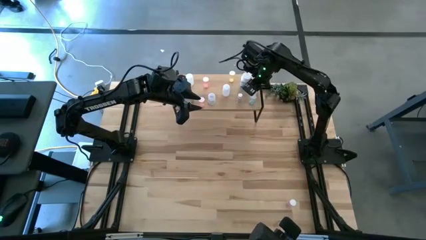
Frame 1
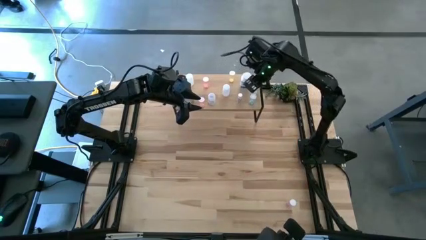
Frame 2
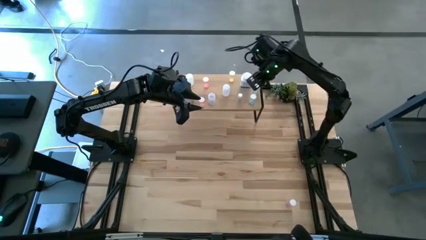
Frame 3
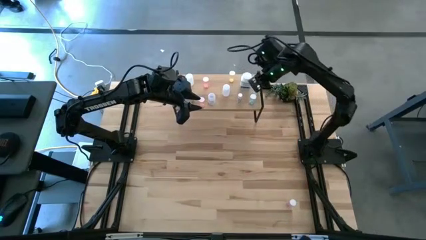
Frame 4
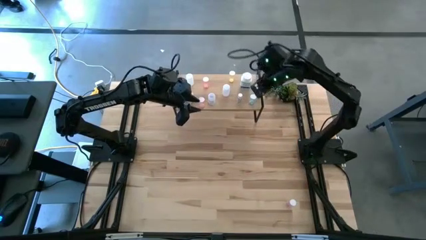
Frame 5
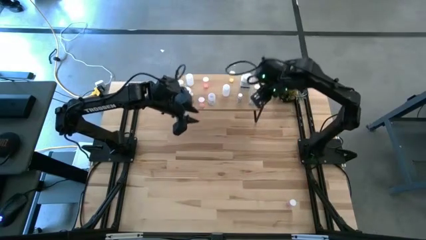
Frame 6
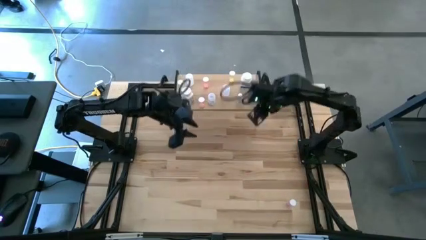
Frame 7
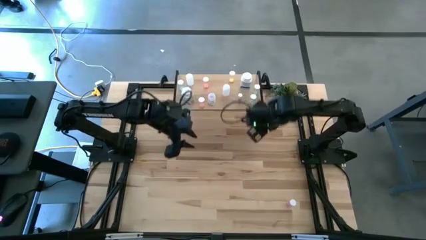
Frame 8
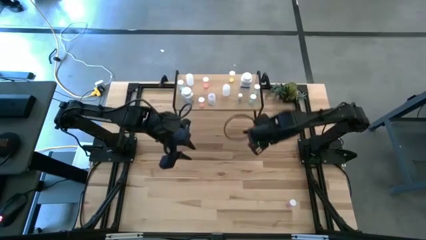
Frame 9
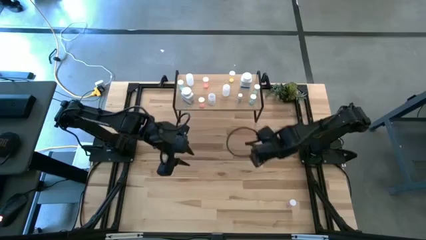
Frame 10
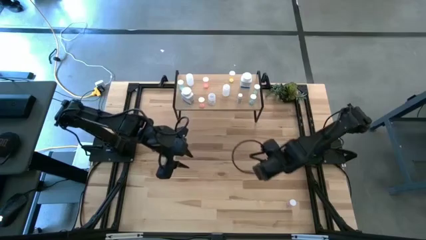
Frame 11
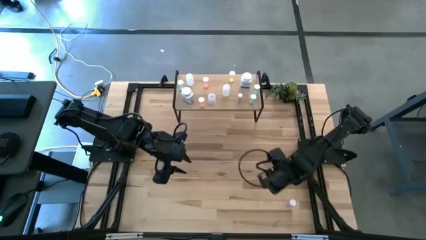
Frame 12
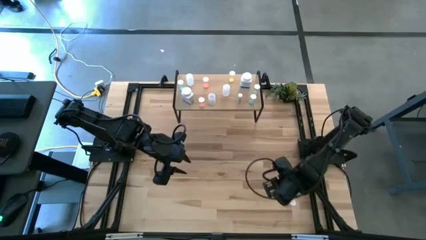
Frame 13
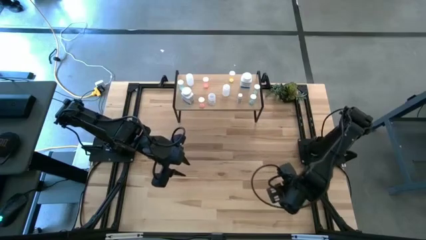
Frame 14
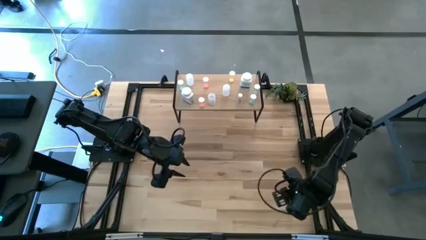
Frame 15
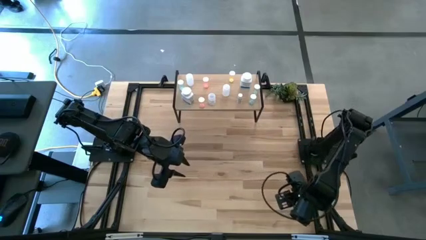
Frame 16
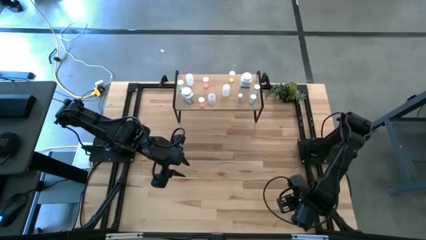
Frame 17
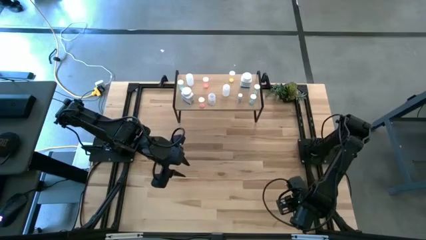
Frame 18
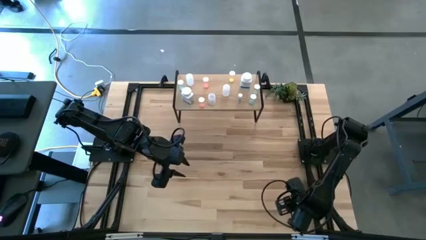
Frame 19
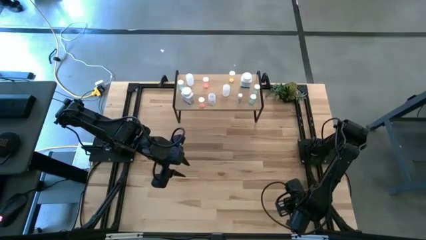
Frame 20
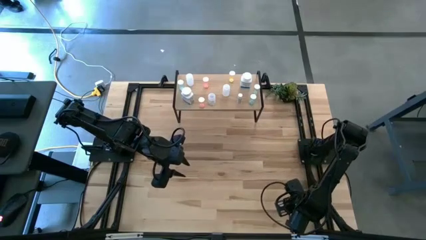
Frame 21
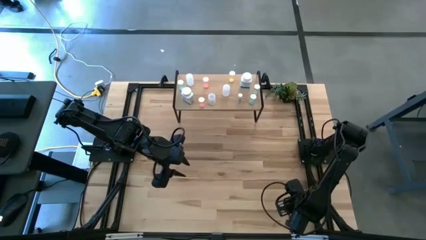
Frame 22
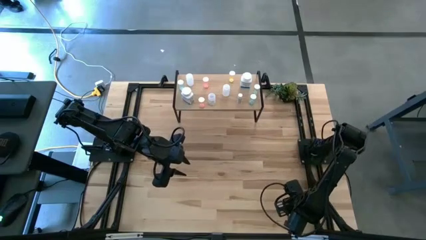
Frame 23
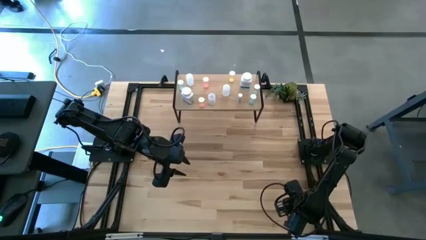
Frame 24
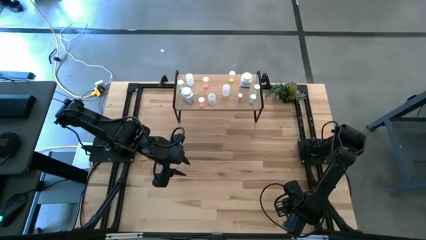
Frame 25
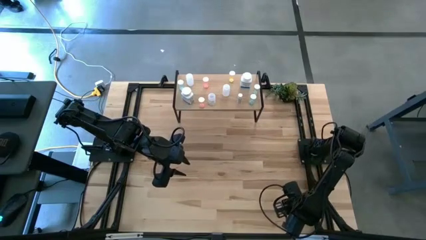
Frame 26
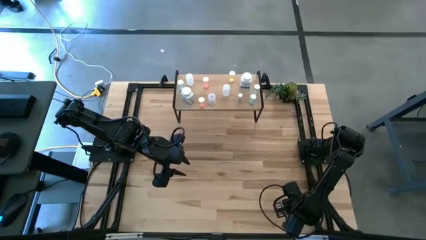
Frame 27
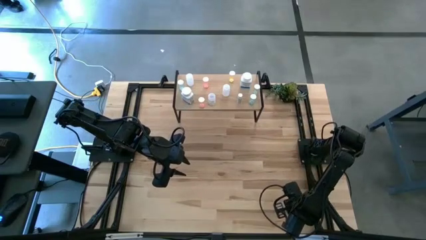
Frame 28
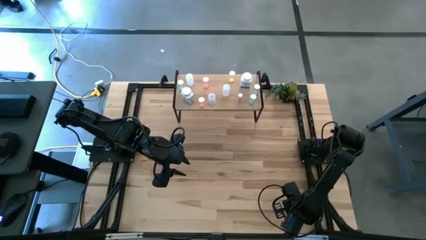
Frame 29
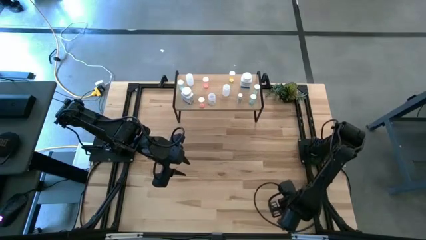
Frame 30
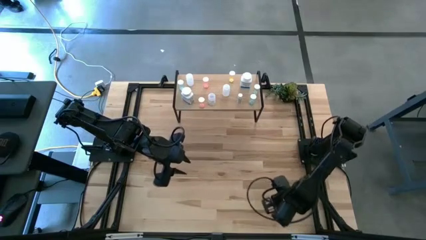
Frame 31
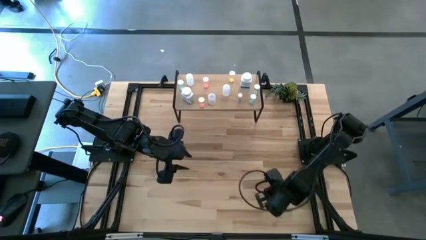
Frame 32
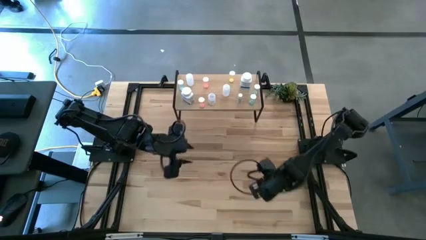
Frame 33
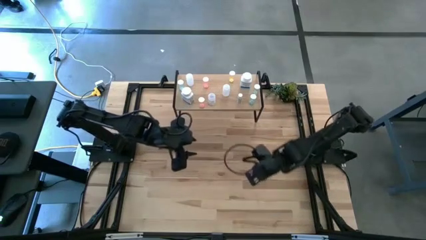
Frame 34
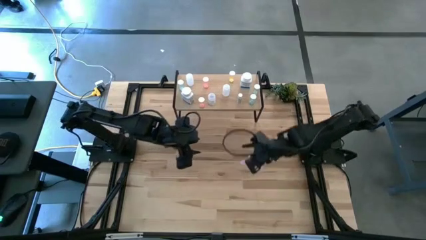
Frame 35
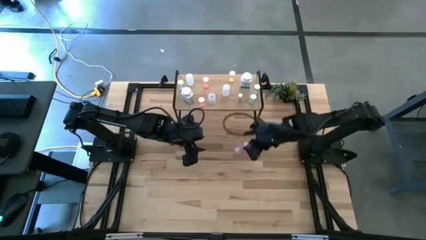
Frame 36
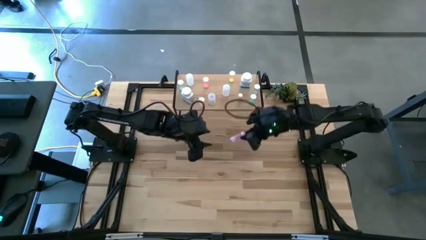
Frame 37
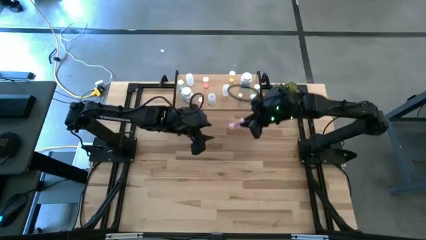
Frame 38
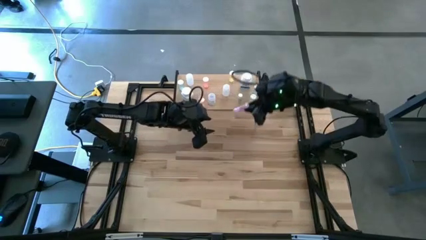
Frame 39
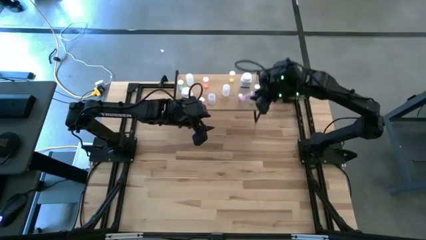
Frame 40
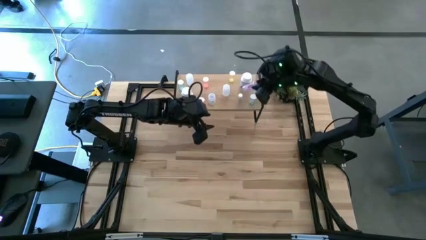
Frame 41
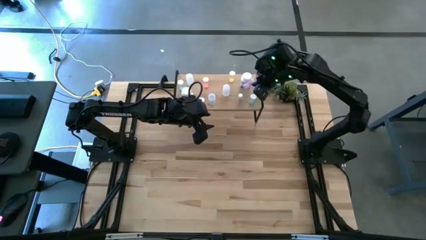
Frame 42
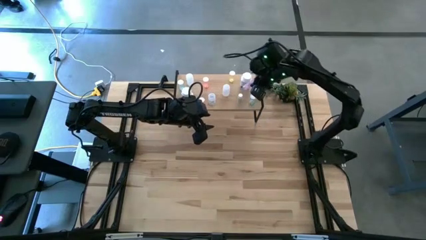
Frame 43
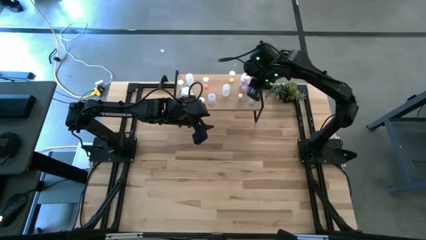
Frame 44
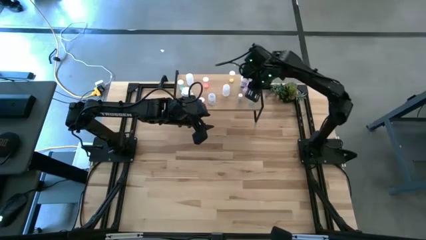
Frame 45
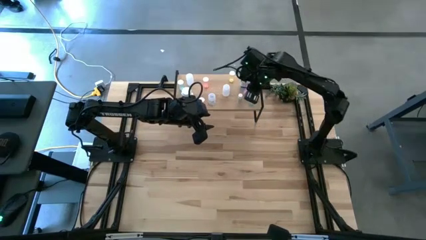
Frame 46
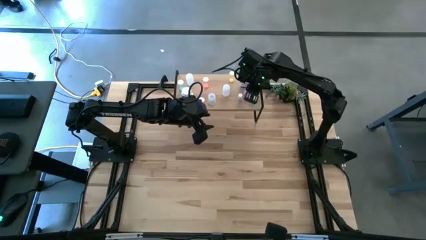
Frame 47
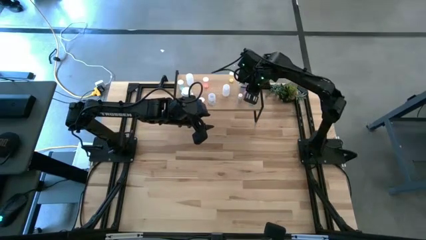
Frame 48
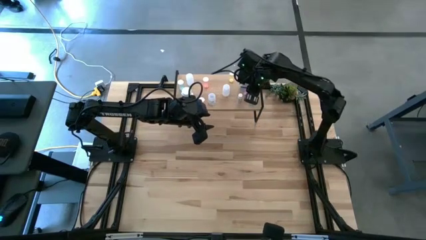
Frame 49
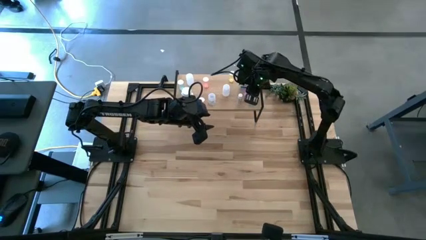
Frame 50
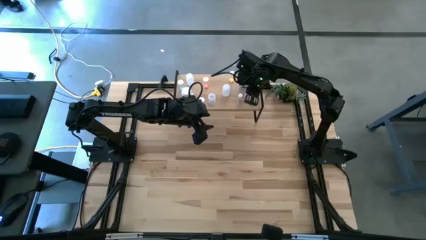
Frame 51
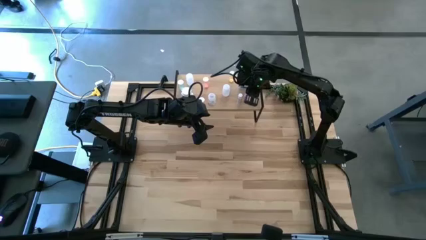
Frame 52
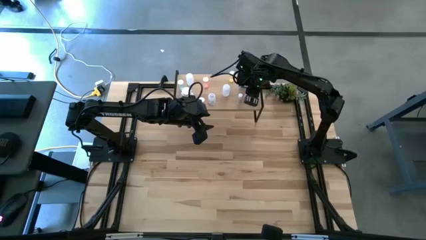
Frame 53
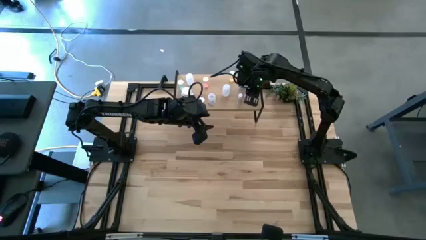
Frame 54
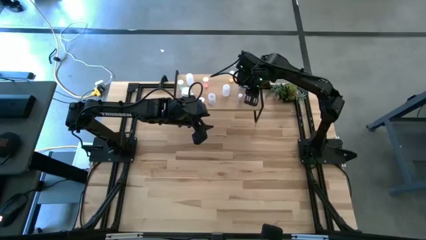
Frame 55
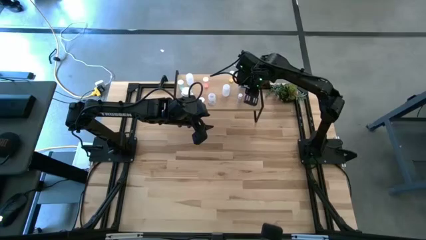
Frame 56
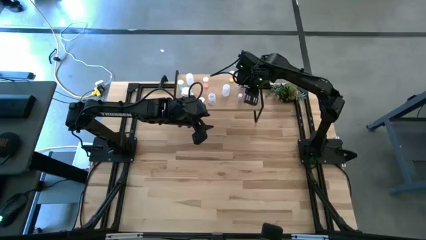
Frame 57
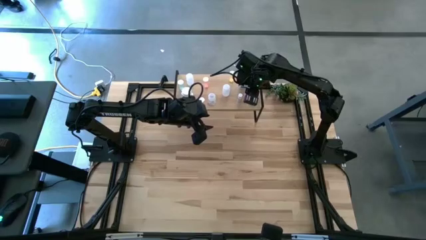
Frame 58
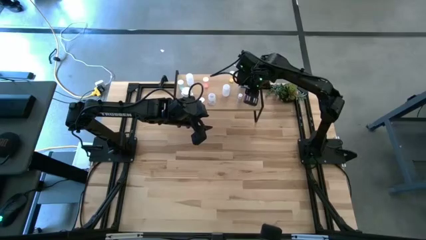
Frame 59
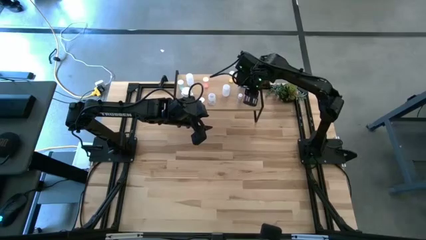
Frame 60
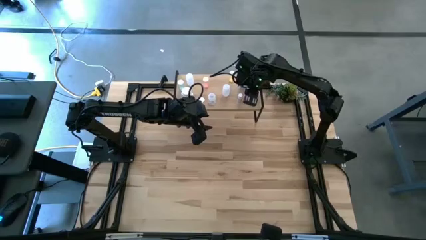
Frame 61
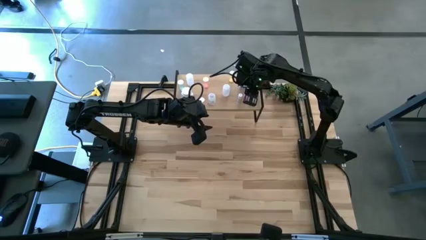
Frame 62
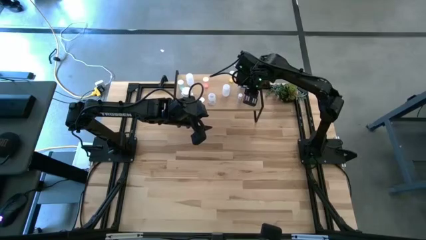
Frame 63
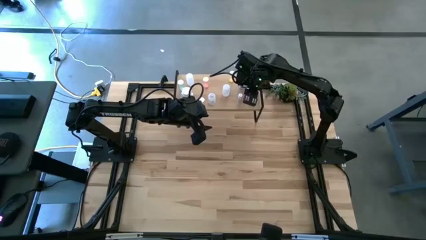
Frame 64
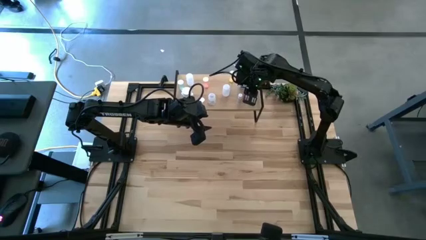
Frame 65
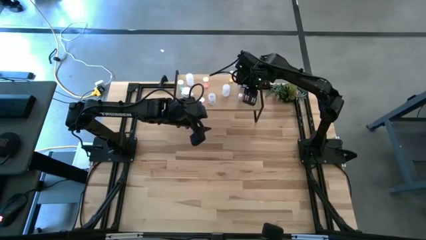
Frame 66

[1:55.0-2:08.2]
Task: Pick and place medicine bottles onto shelf by color
Put the red transparent pill bottle on the shelf

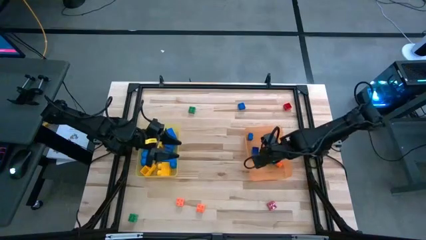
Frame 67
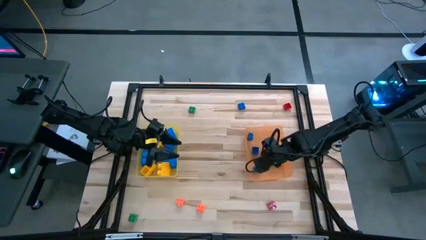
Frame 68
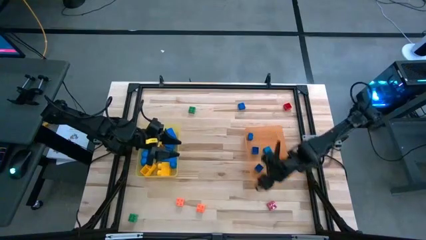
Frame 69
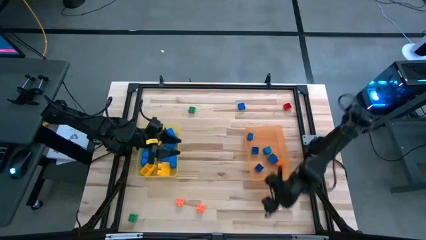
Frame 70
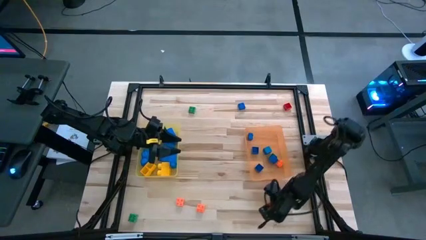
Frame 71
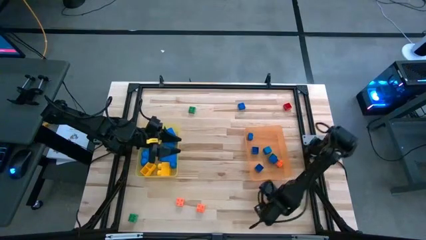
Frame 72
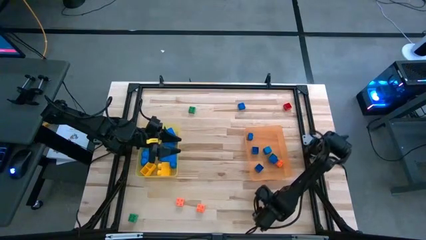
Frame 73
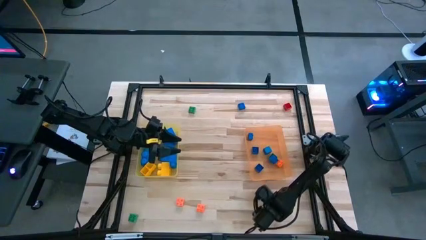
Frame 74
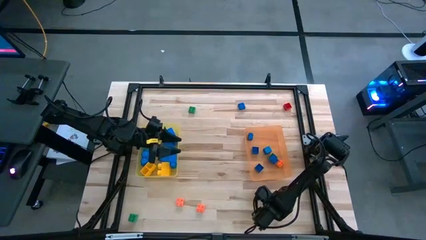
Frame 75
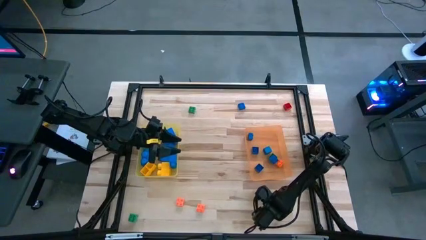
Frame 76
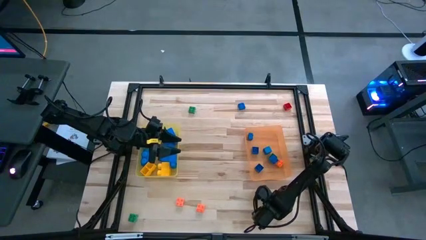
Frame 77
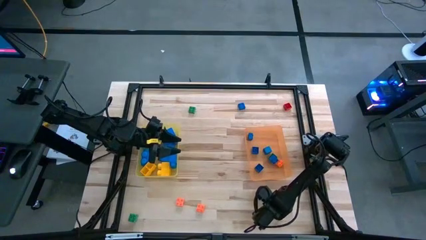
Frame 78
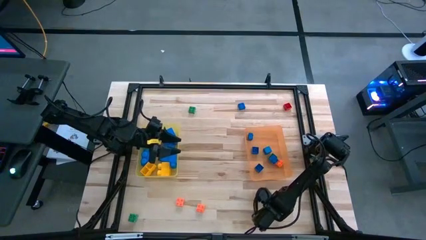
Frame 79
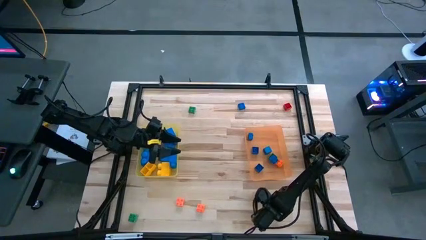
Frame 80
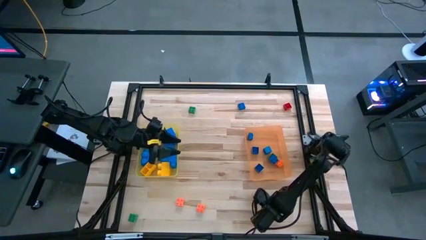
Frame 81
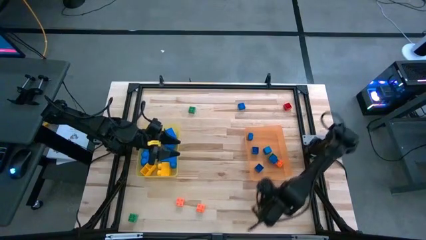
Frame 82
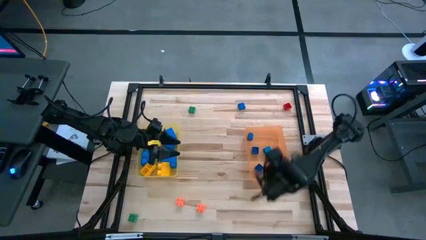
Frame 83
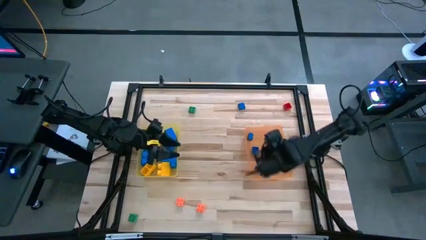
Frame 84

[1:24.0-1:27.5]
Task: Sort blocks by size
Put the small red game piece into the orange bin
